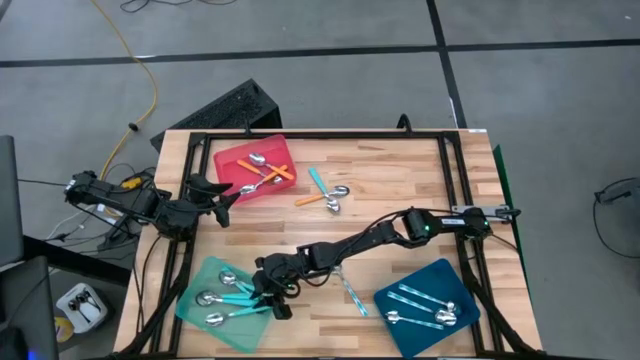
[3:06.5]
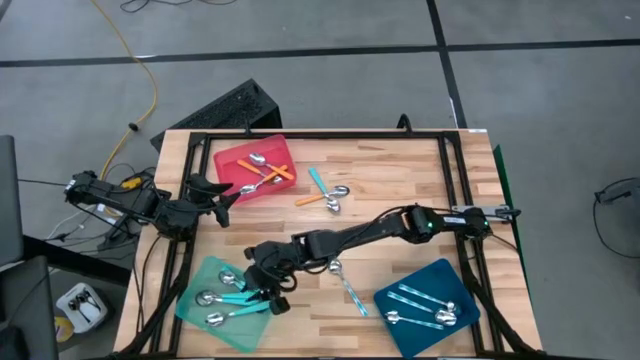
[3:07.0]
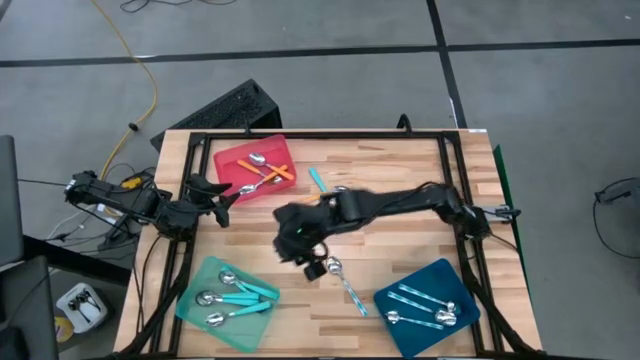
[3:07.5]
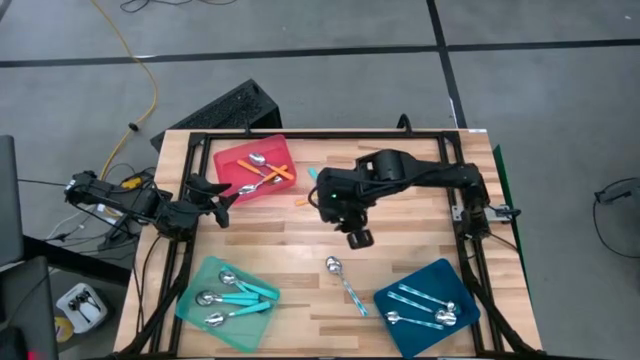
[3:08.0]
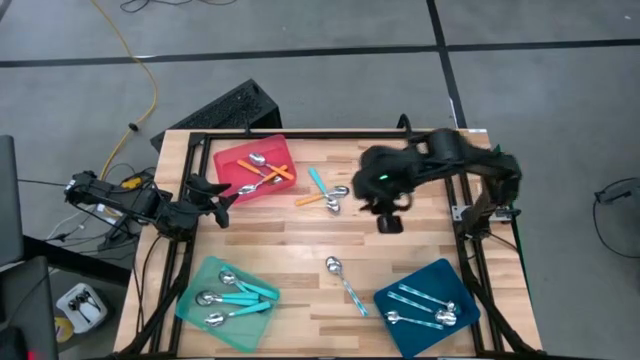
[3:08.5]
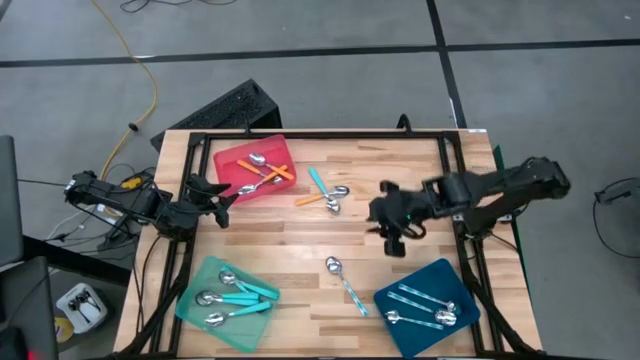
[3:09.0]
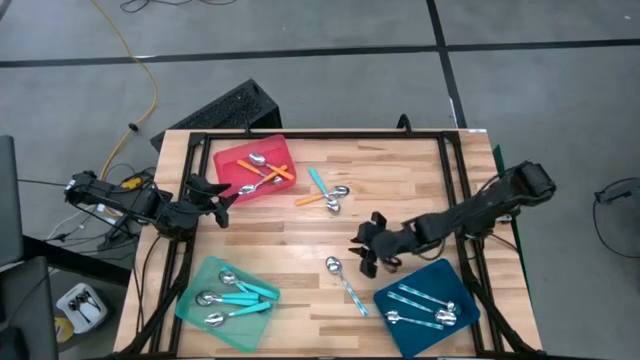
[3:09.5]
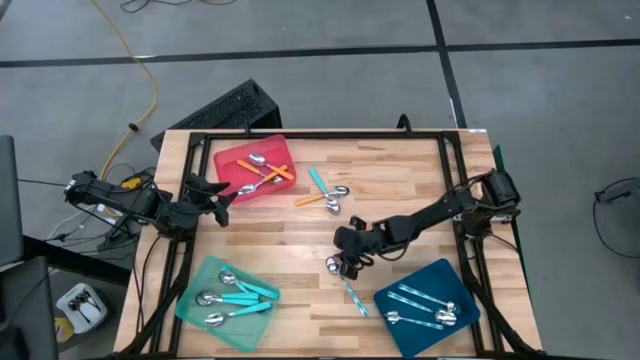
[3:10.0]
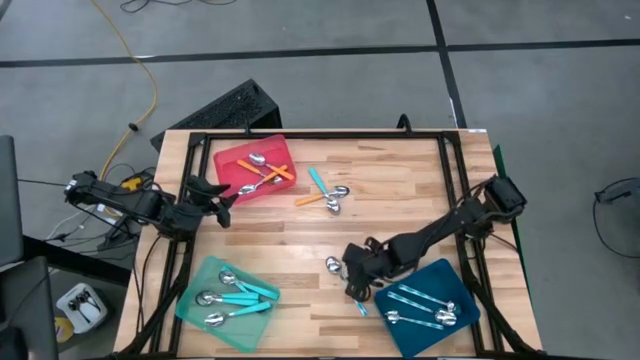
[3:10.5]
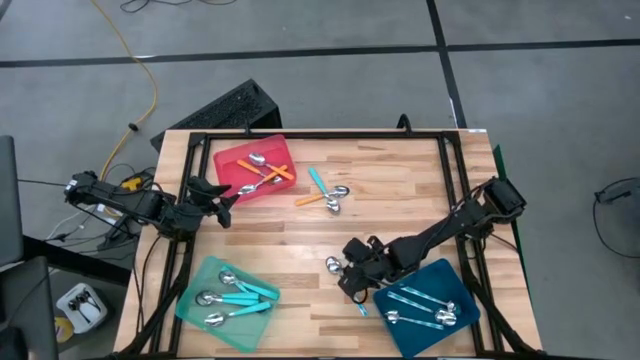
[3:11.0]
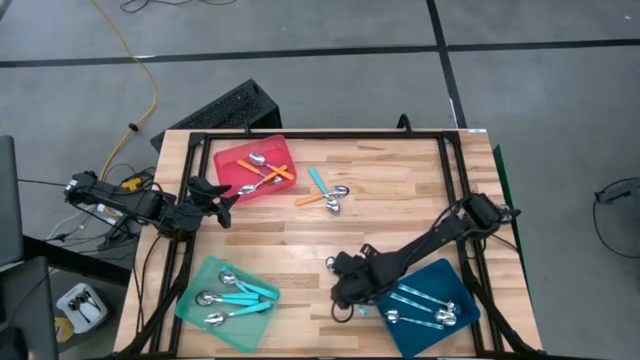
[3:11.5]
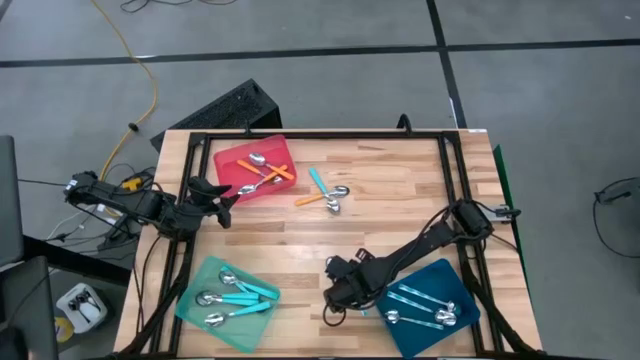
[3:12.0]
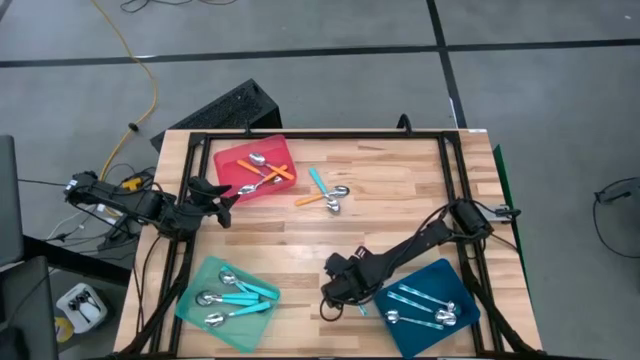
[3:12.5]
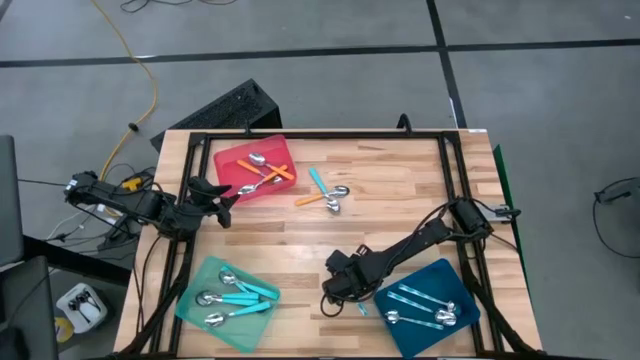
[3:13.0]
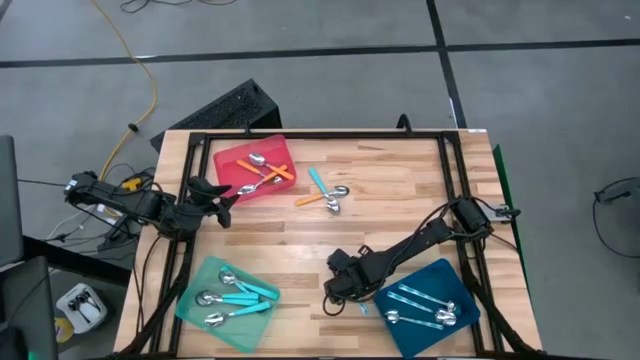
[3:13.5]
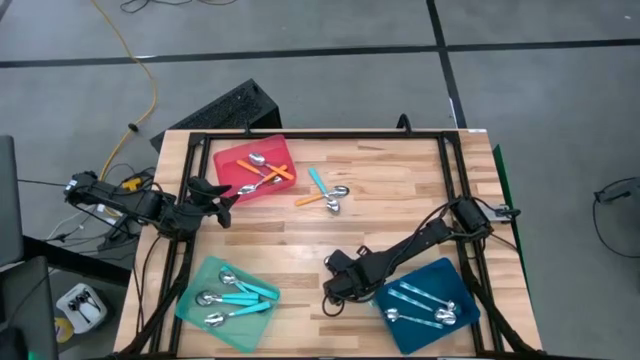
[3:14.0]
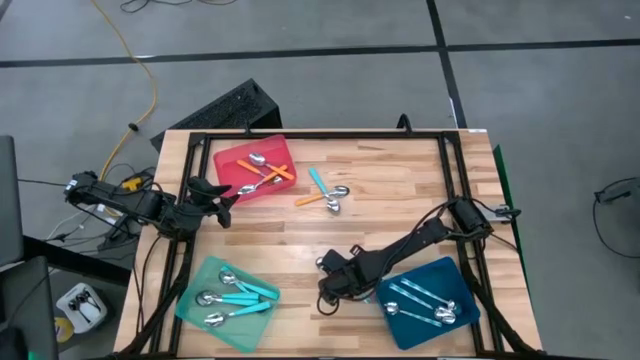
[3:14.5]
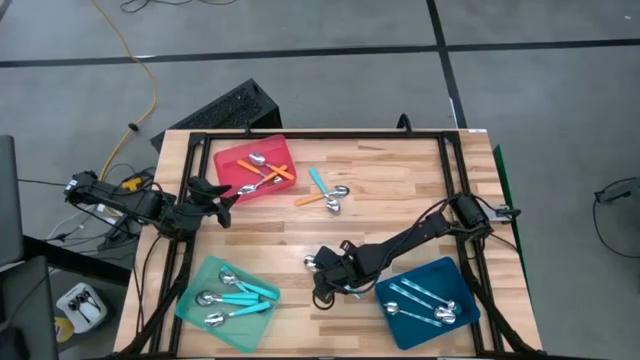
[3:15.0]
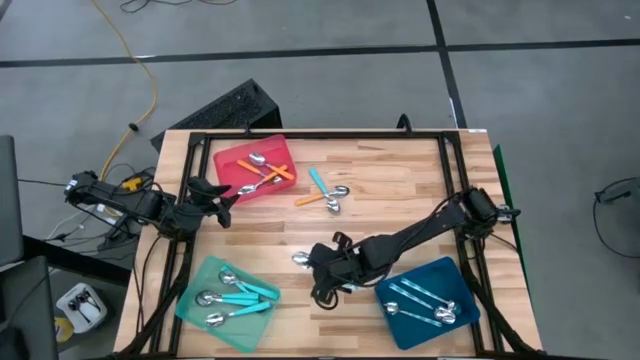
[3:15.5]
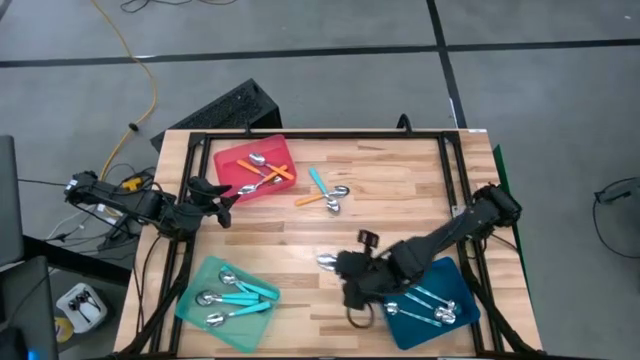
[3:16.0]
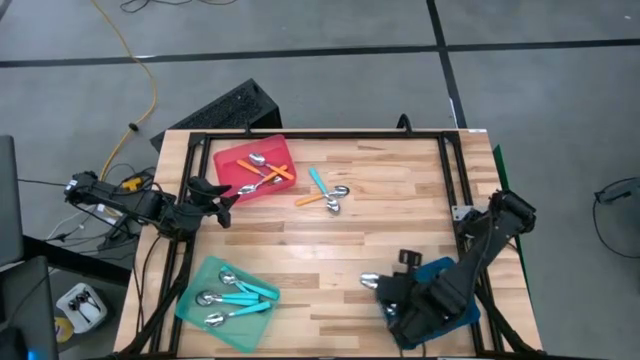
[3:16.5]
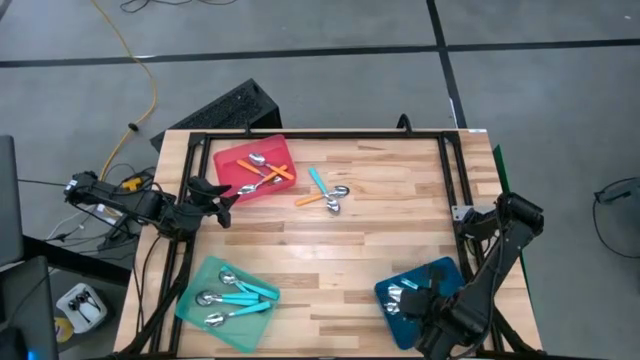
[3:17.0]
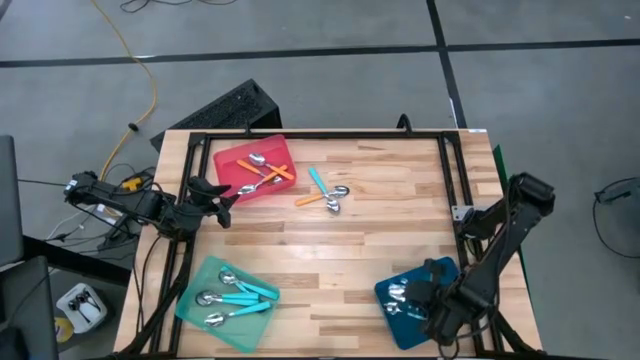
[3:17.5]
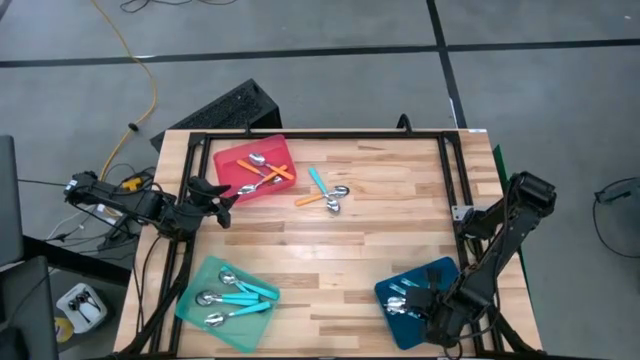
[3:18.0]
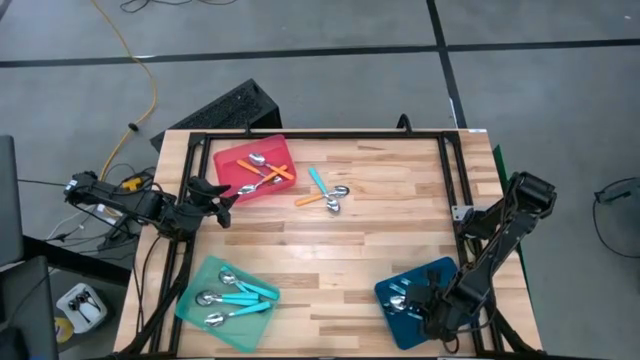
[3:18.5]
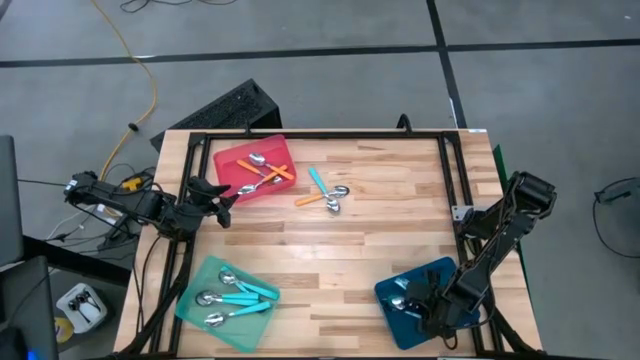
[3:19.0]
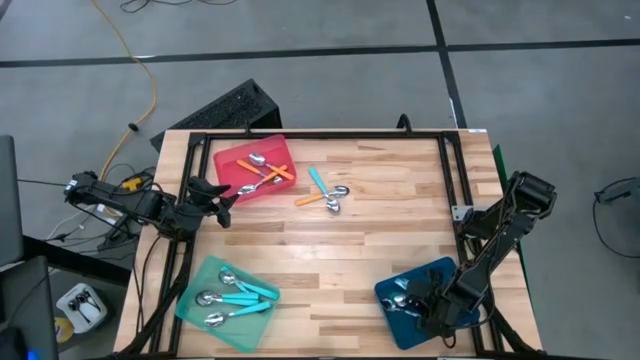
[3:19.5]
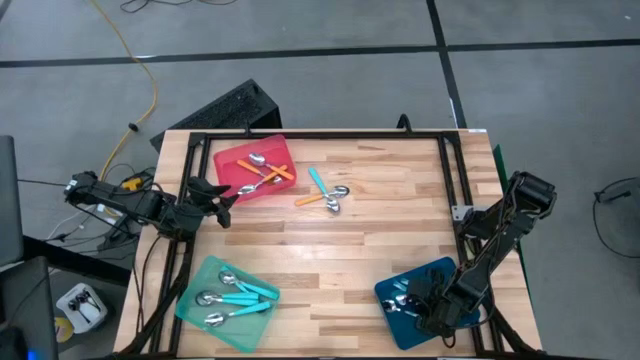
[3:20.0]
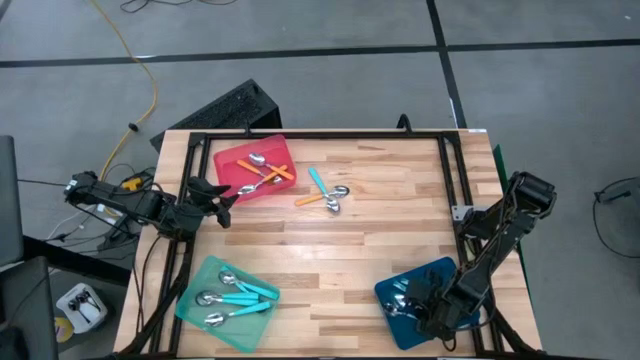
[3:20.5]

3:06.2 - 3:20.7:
Task: Sort silverware by color (type)
Put the blue patterned spoon into the blue bin

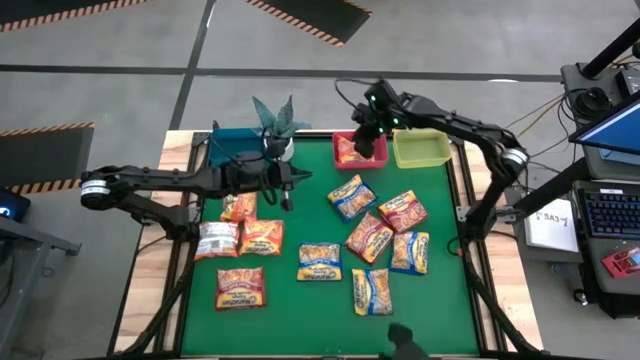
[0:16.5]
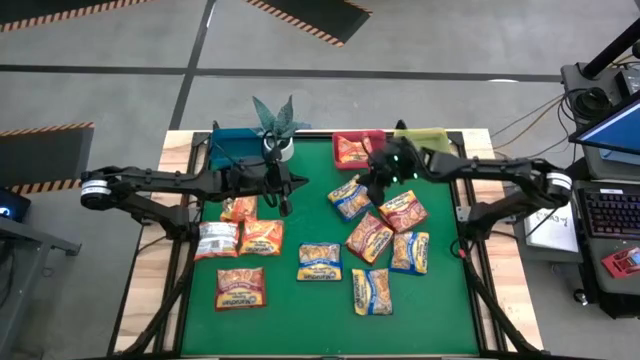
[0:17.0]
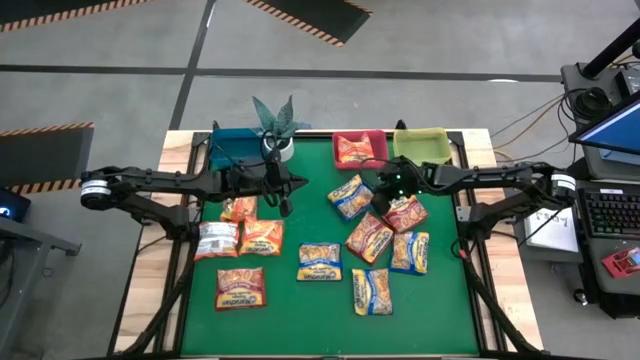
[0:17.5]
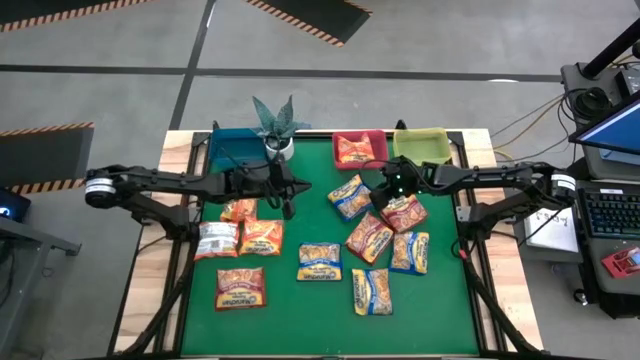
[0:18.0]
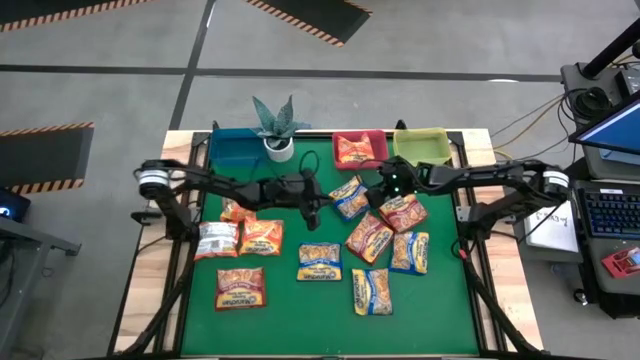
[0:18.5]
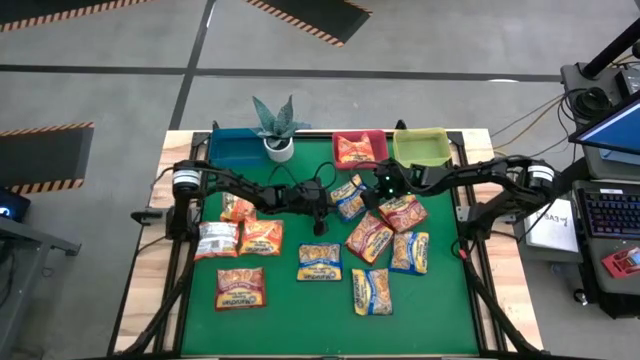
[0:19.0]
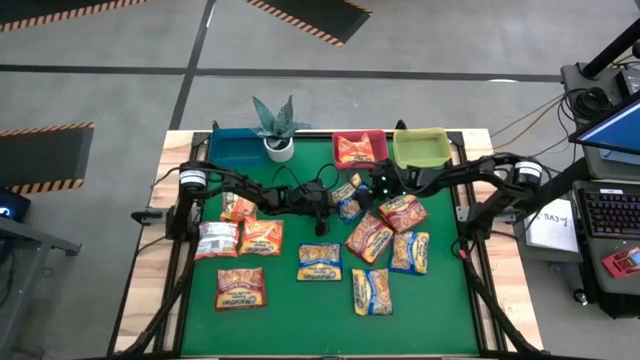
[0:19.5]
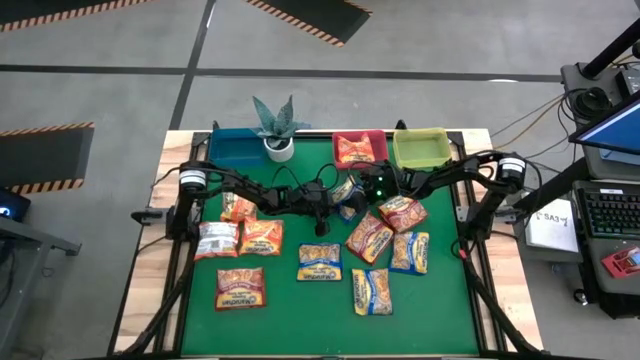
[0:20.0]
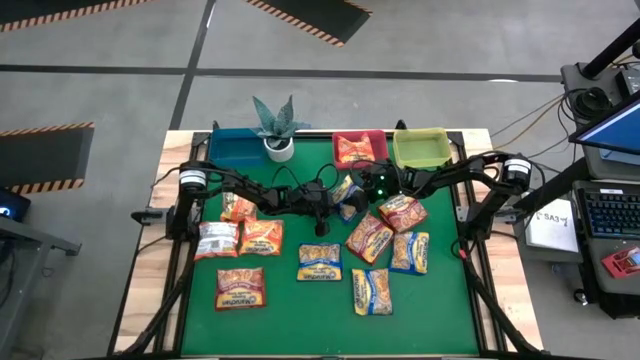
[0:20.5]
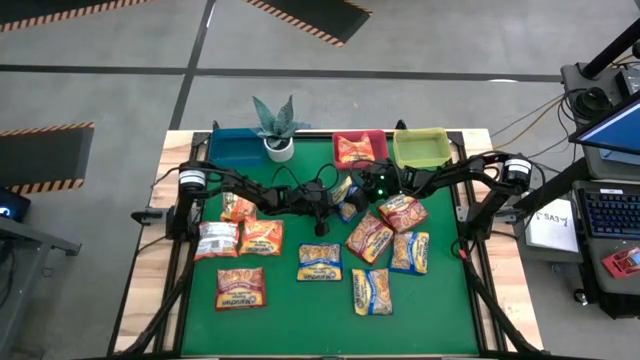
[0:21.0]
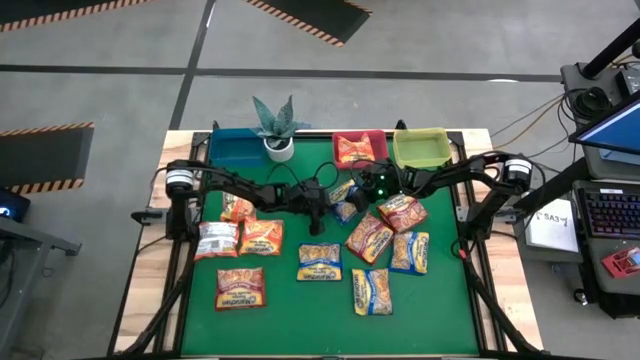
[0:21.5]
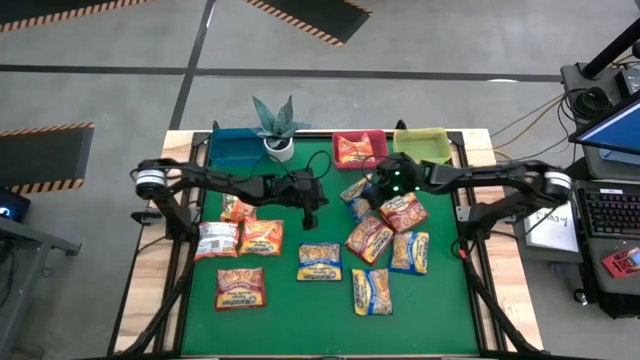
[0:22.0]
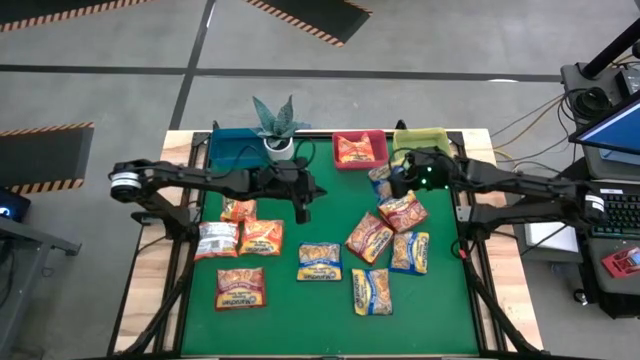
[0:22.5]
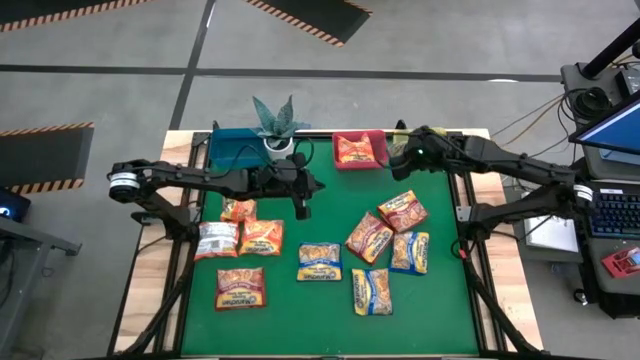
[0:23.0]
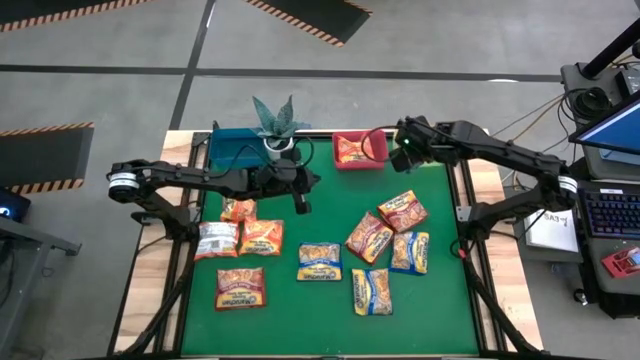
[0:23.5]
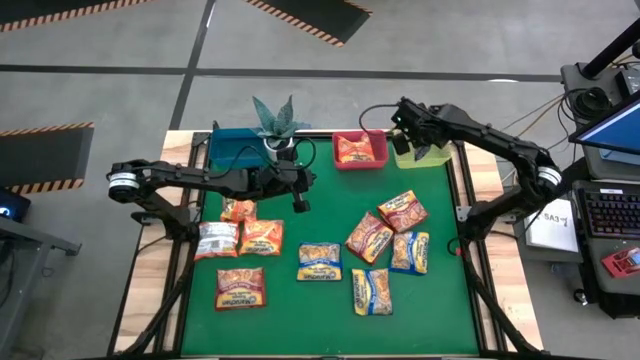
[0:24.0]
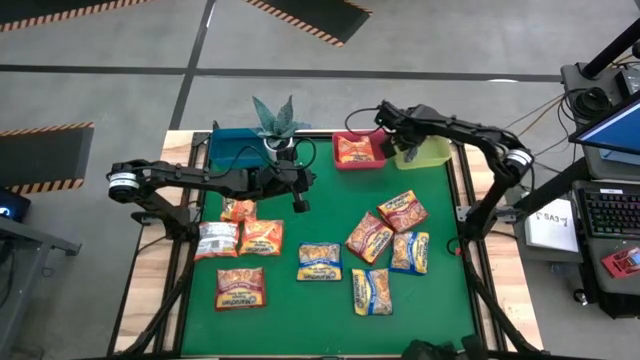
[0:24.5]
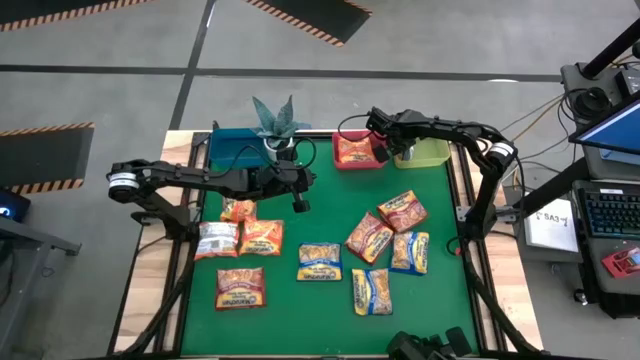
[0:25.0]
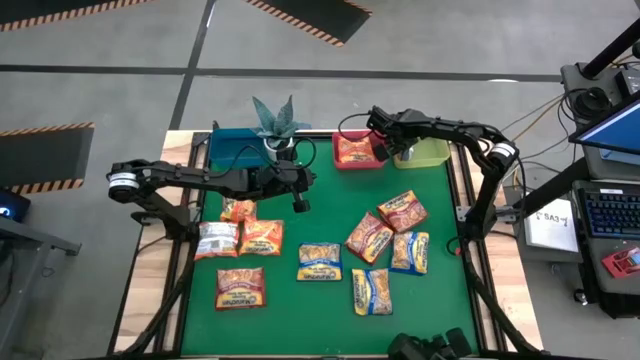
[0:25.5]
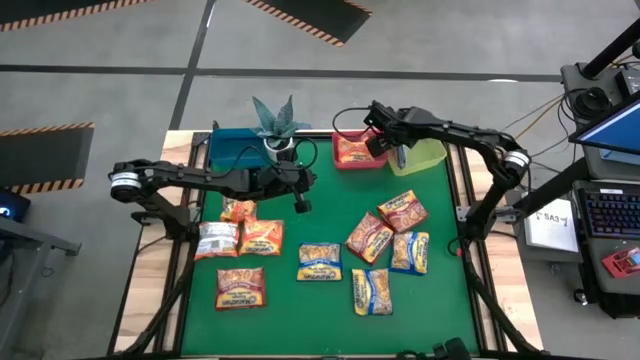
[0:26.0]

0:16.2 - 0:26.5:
Task: Sort Maruchan noodles
Put the blue noodle pack into the yellow bin
